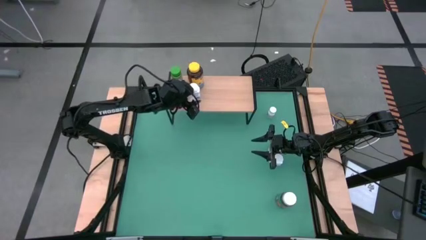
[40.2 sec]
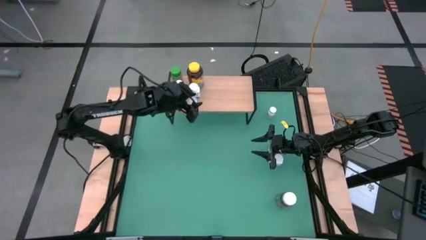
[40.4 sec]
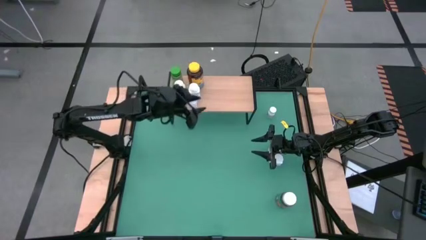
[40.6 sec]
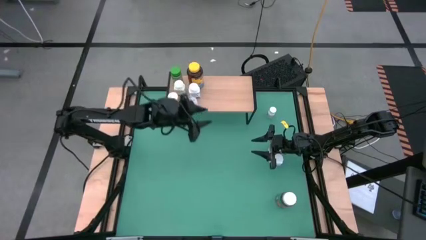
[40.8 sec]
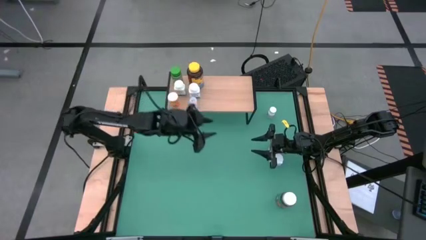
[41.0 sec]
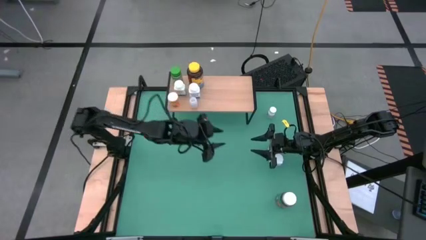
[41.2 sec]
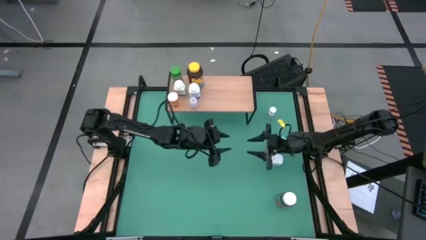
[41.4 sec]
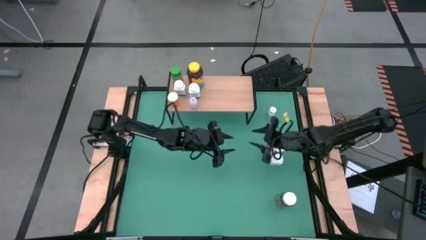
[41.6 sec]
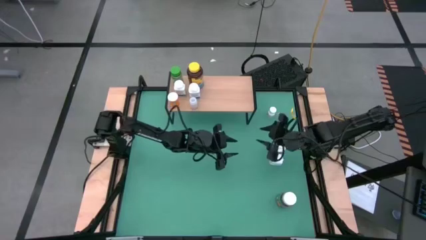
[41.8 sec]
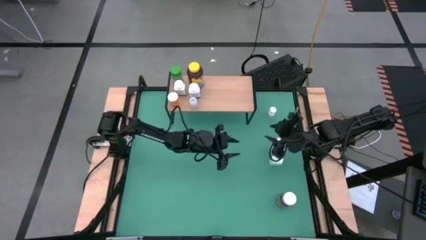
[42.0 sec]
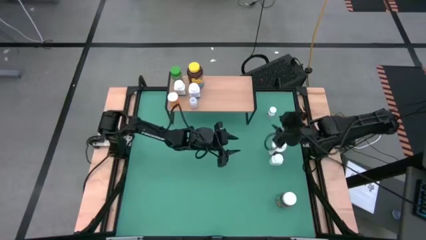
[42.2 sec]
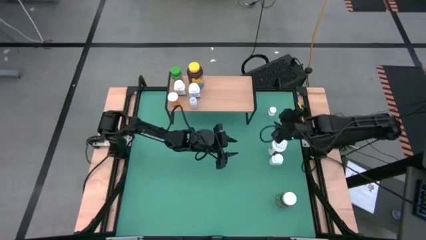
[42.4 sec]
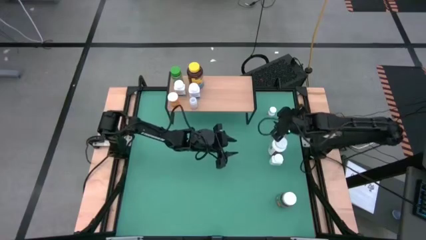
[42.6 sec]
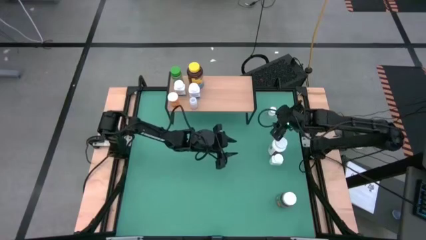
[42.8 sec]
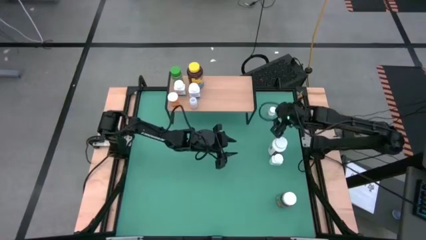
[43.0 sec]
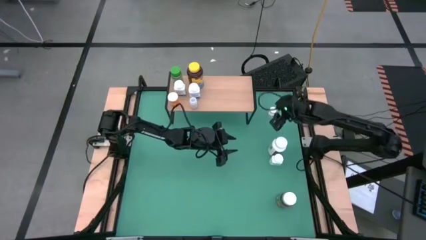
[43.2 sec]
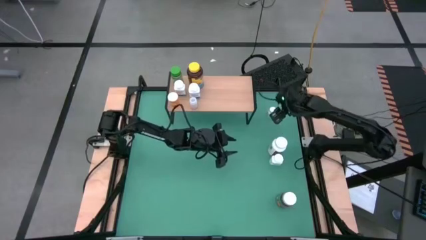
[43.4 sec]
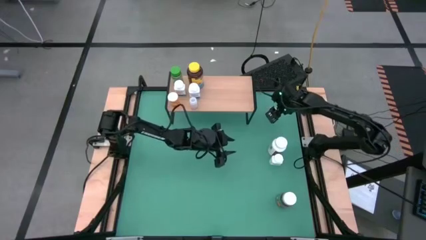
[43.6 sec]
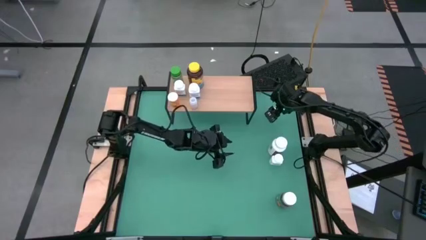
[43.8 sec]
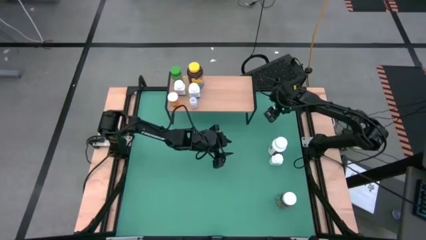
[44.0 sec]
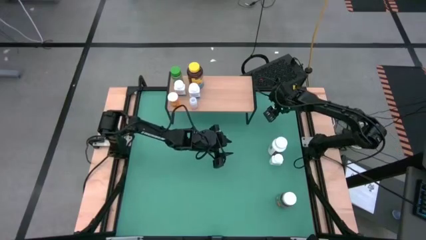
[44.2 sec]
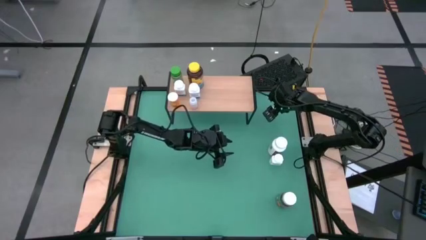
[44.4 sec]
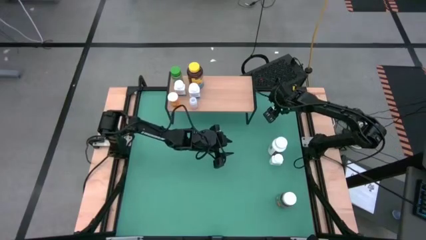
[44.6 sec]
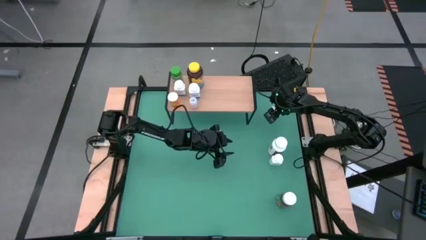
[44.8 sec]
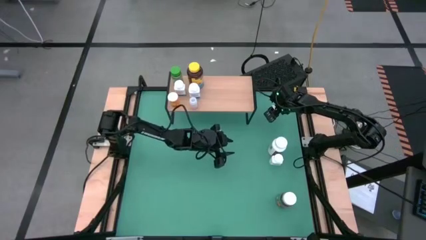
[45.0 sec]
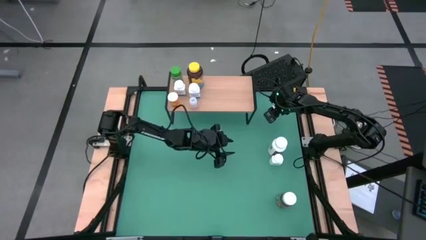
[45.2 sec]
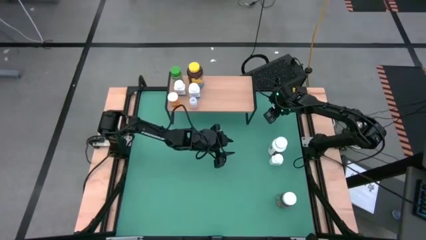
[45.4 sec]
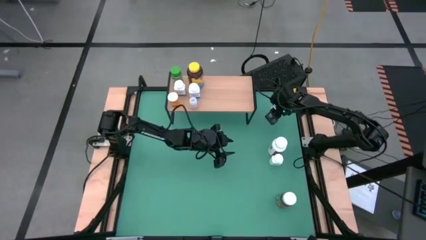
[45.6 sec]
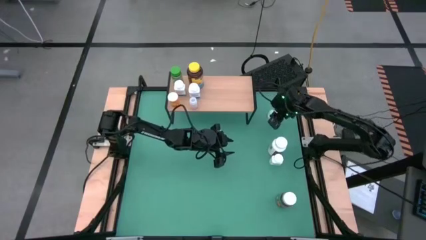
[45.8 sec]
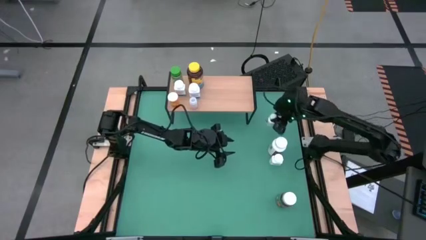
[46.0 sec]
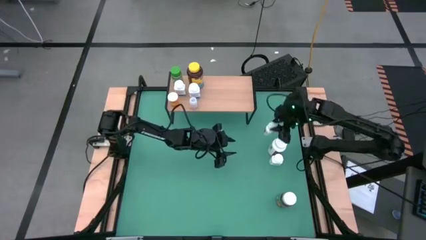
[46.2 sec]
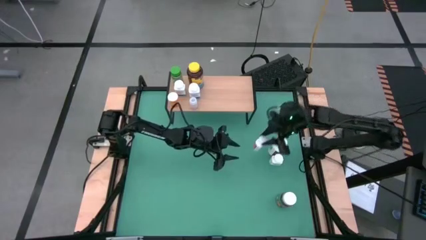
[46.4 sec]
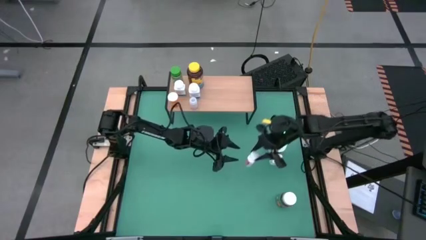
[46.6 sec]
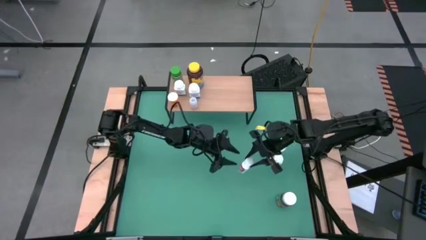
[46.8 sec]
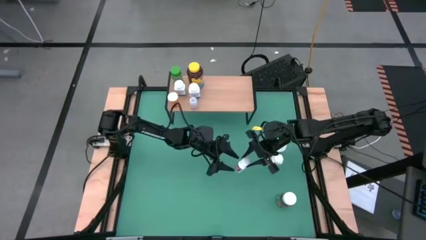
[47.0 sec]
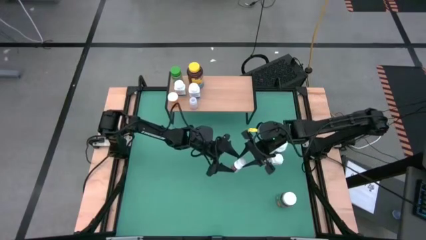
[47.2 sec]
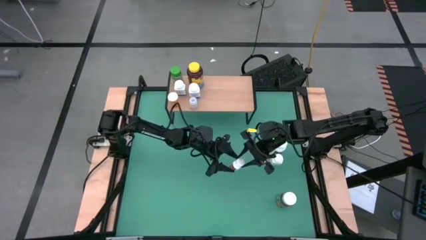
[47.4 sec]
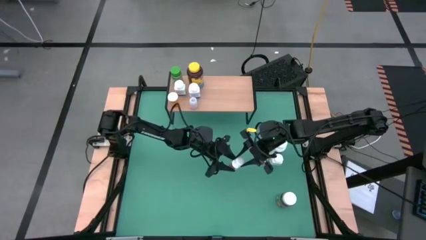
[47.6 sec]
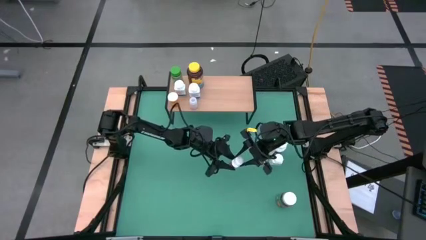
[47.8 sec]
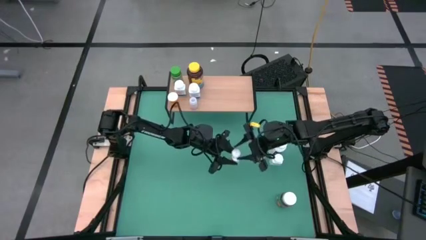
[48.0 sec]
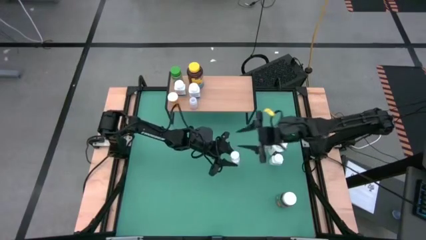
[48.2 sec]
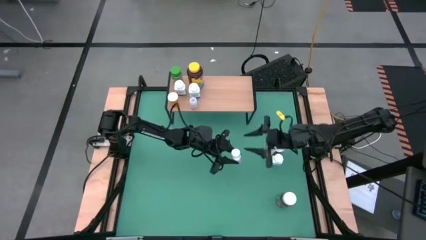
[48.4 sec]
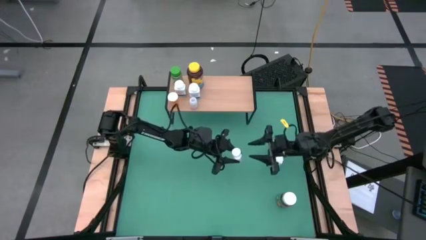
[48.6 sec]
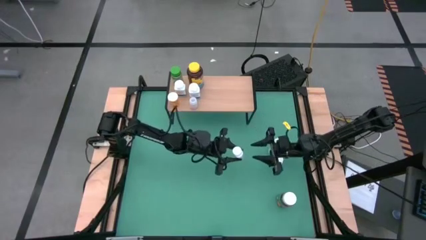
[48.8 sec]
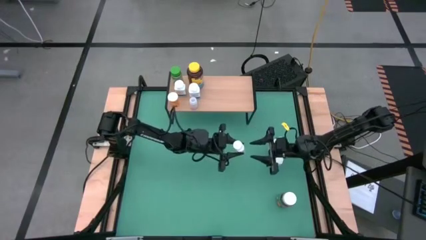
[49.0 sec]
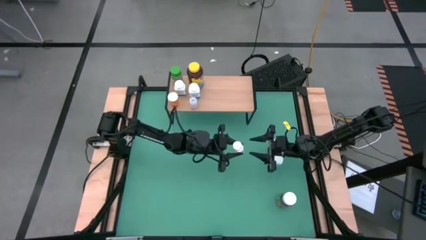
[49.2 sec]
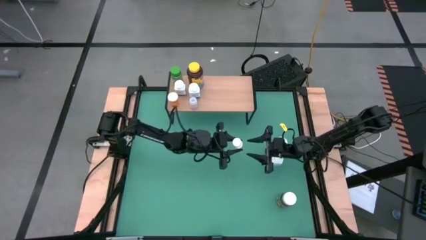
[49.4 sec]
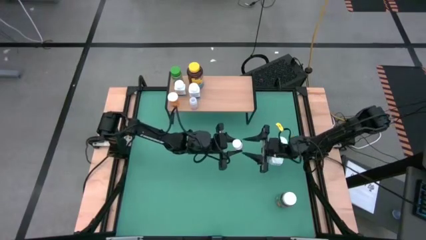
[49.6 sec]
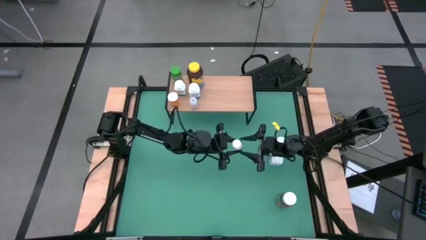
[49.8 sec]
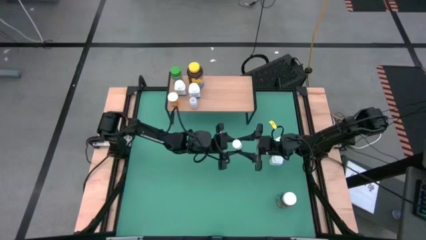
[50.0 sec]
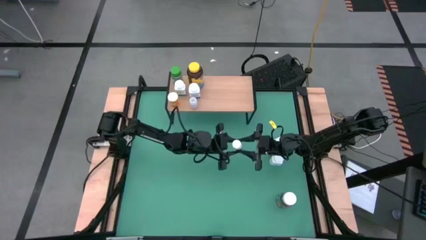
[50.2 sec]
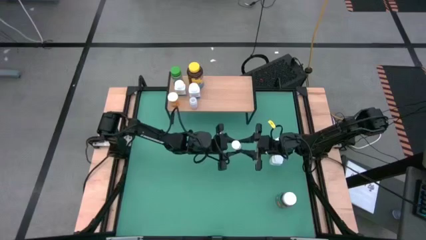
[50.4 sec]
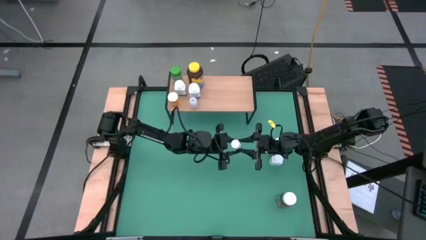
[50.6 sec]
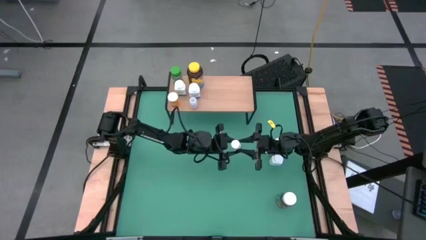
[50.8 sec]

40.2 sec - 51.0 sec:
Task: Pick and place medicine bottles onto shelf by color
Put the small white pill bottle on the shelf
